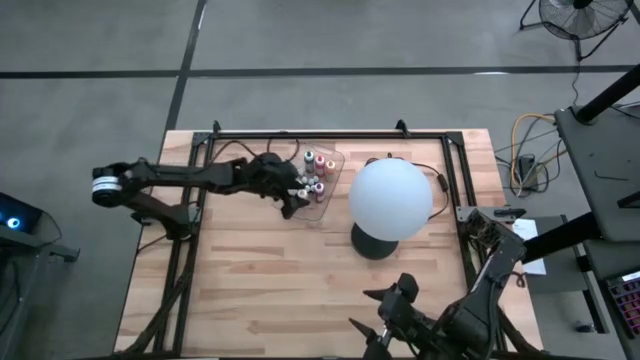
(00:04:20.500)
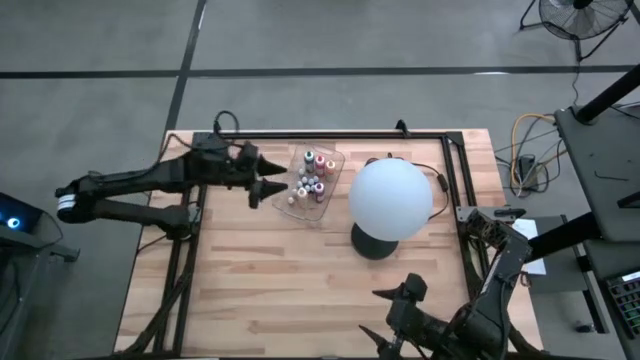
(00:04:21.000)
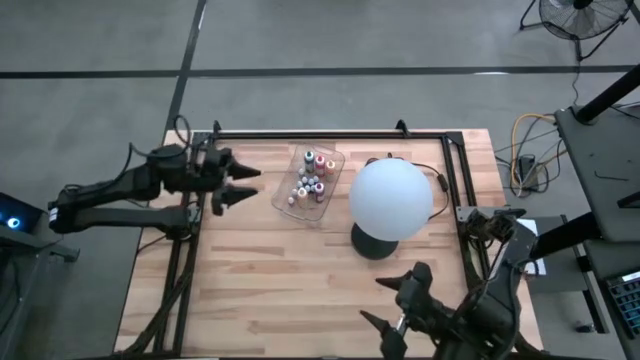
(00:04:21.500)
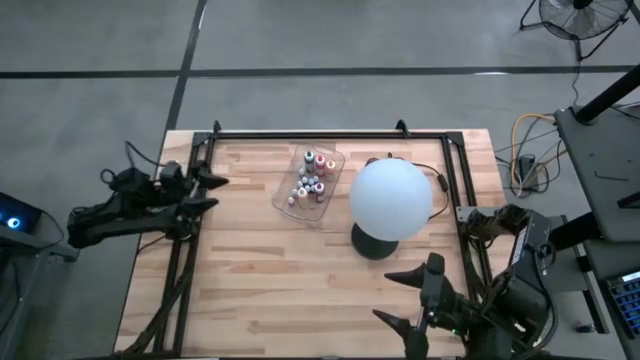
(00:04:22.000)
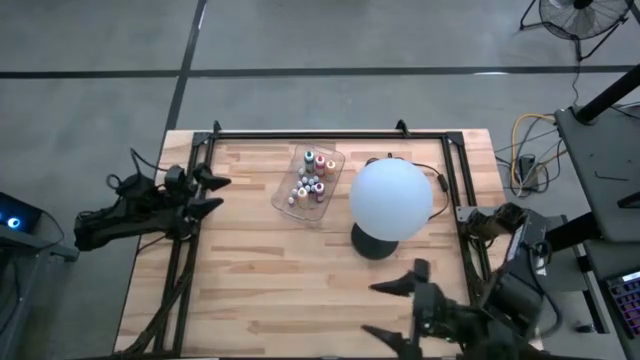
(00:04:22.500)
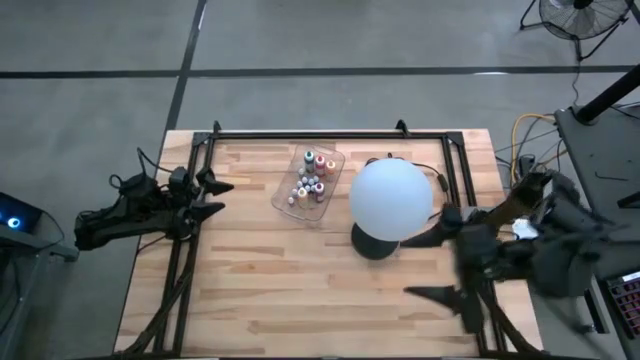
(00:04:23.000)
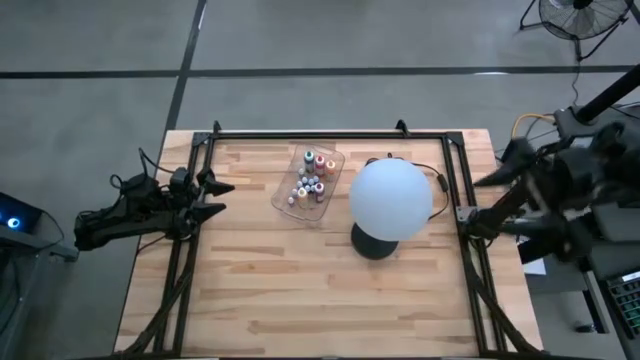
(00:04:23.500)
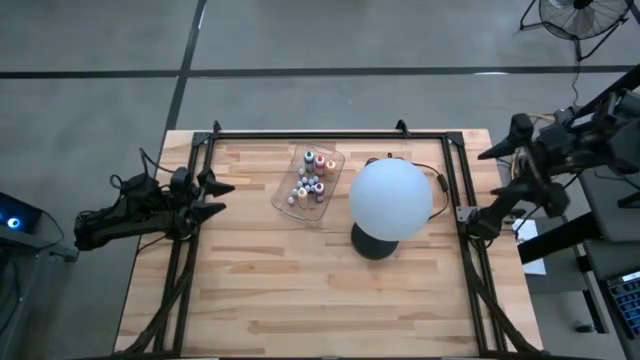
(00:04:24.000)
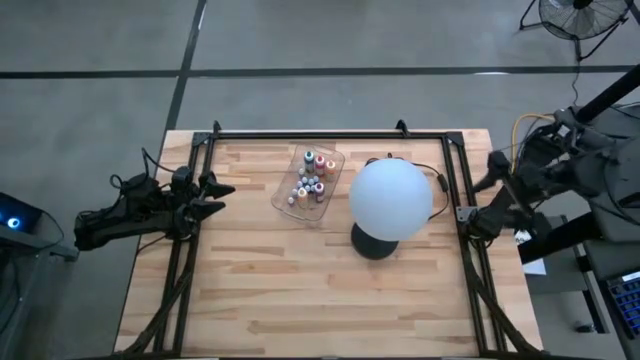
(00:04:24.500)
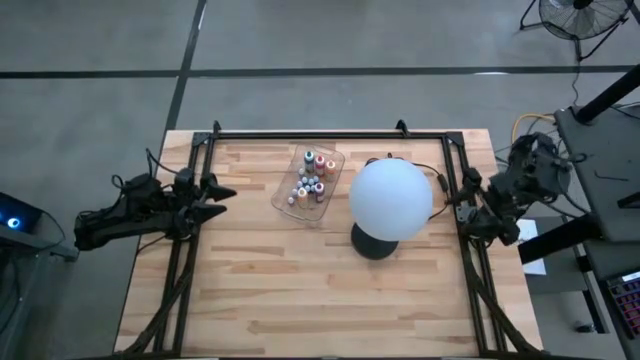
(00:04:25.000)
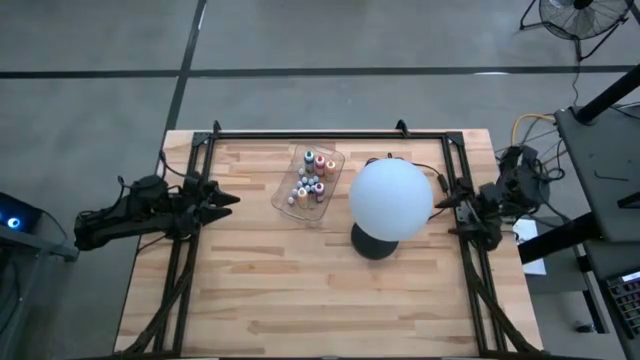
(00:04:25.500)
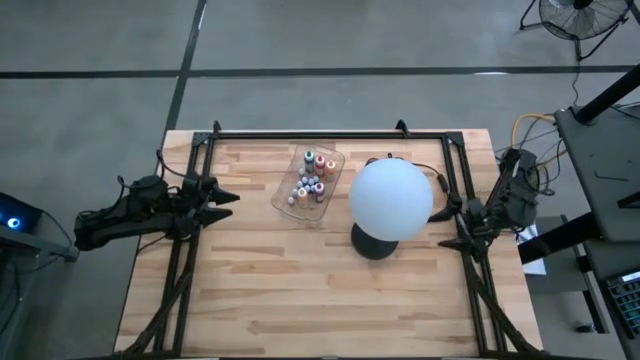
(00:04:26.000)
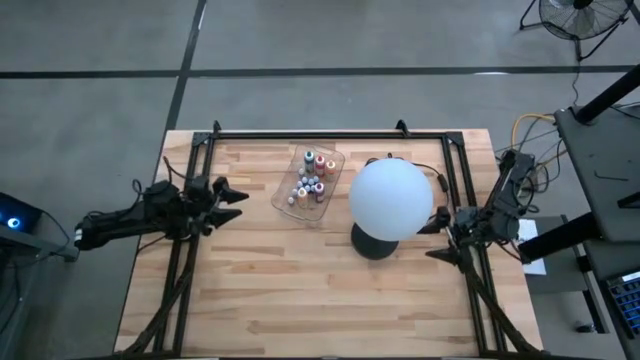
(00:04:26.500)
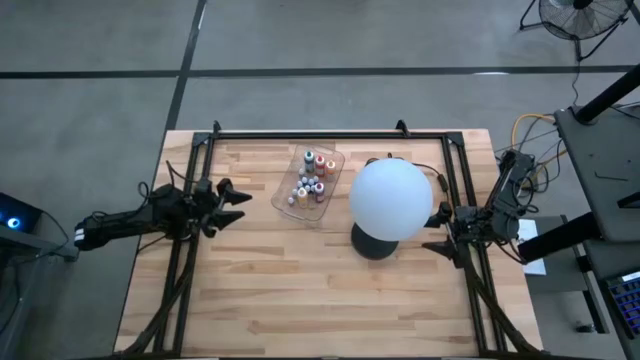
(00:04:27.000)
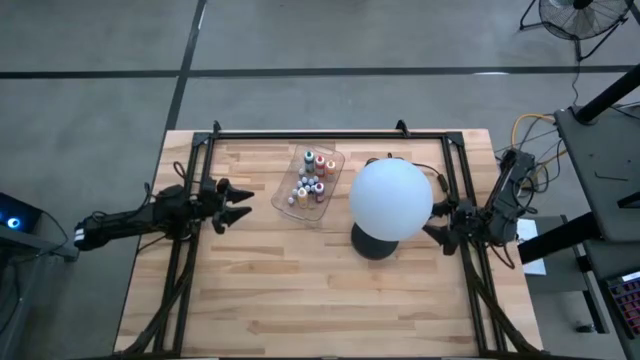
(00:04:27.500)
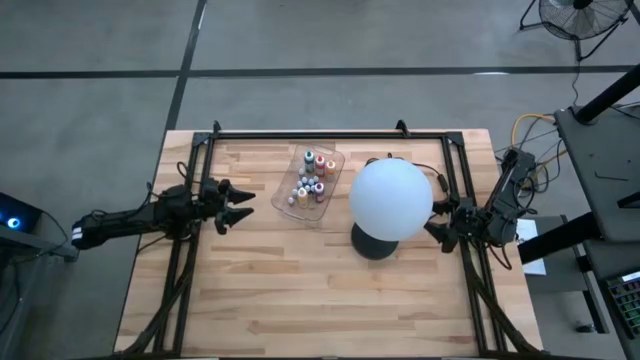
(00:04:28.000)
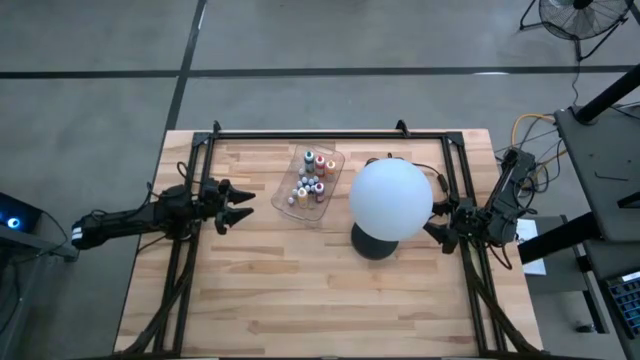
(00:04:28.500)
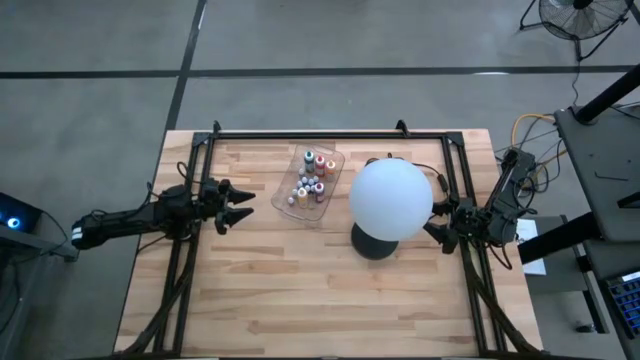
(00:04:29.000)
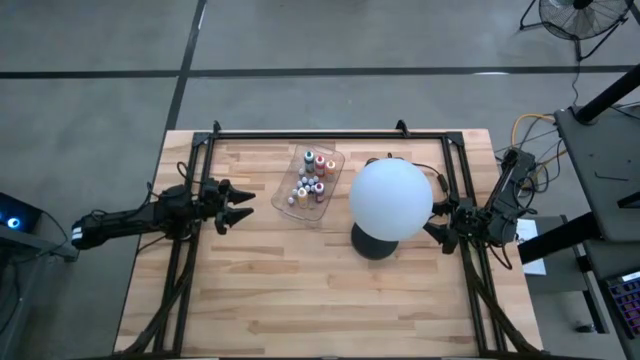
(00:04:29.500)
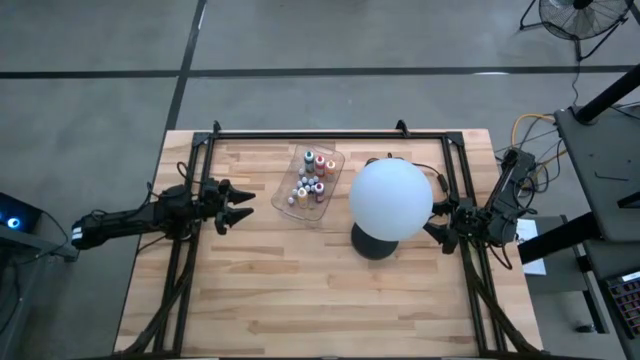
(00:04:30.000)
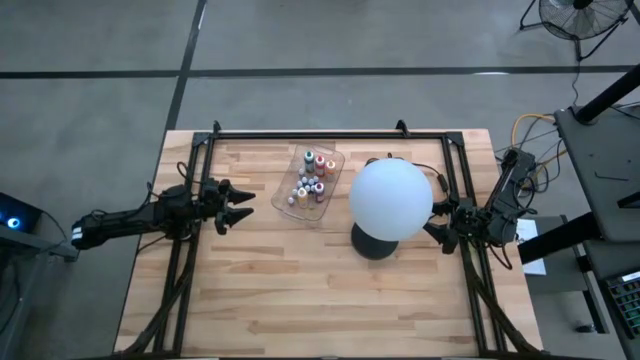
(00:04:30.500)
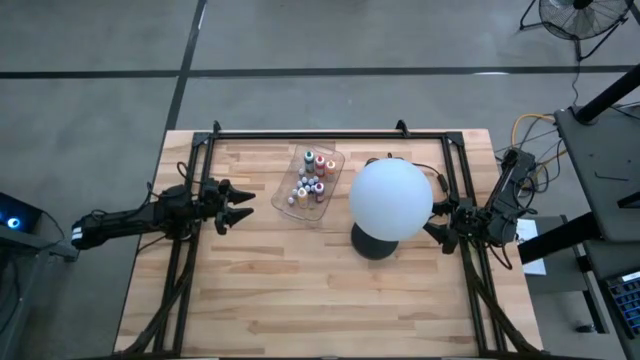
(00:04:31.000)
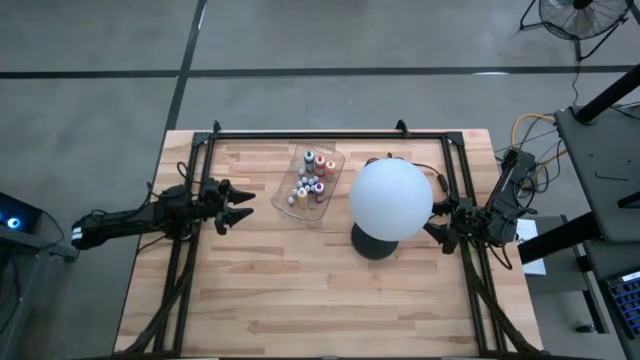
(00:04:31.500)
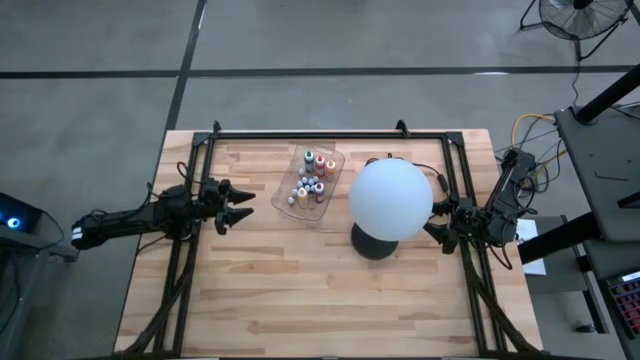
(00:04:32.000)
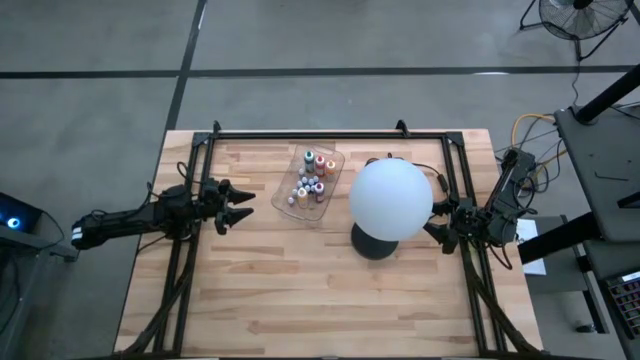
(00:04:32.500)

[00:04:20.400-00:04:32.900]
Task: Pick & Place food coloring
Return to Home Position

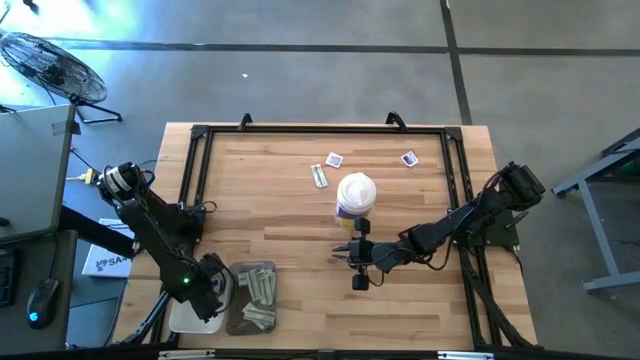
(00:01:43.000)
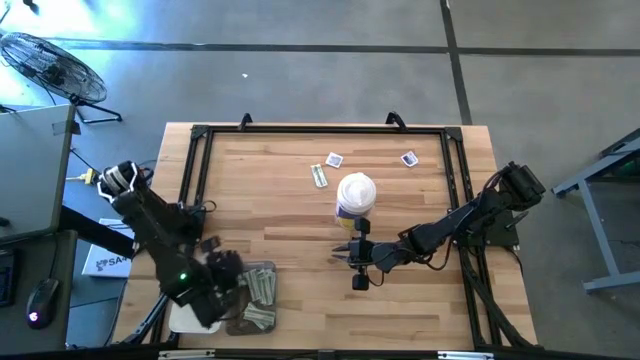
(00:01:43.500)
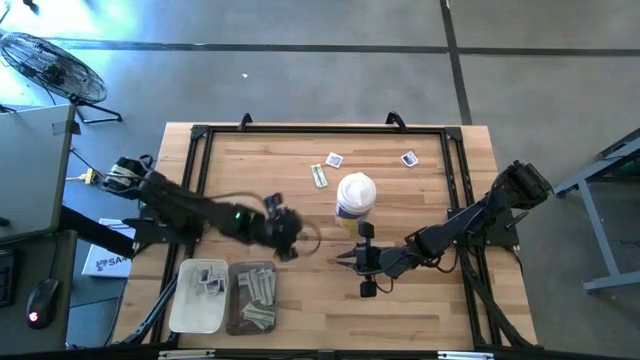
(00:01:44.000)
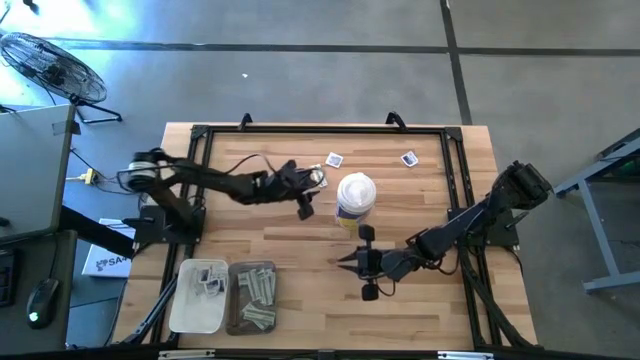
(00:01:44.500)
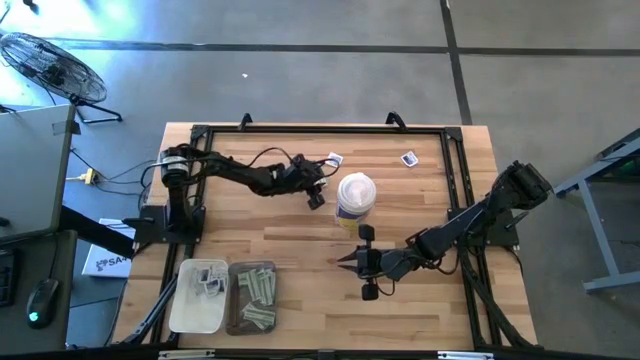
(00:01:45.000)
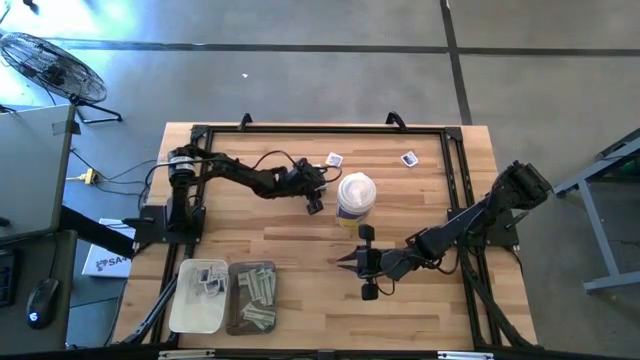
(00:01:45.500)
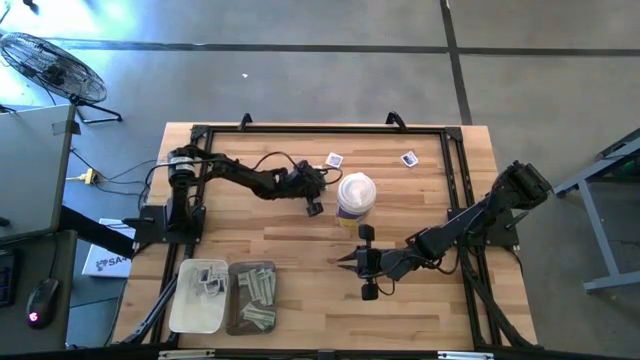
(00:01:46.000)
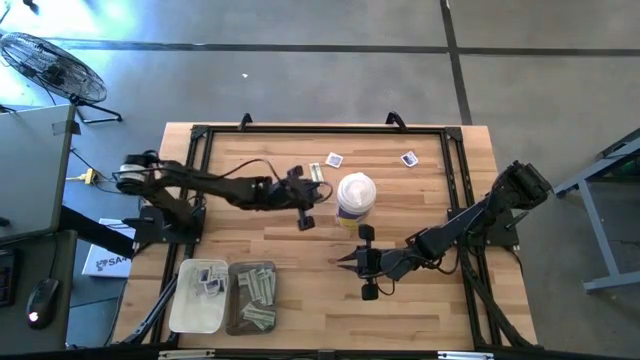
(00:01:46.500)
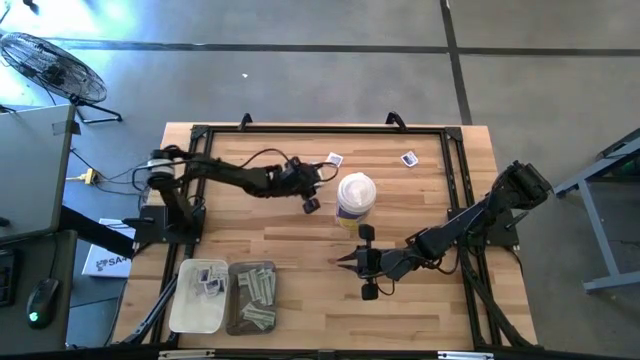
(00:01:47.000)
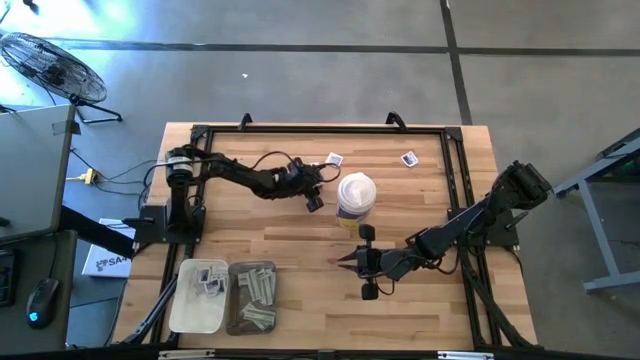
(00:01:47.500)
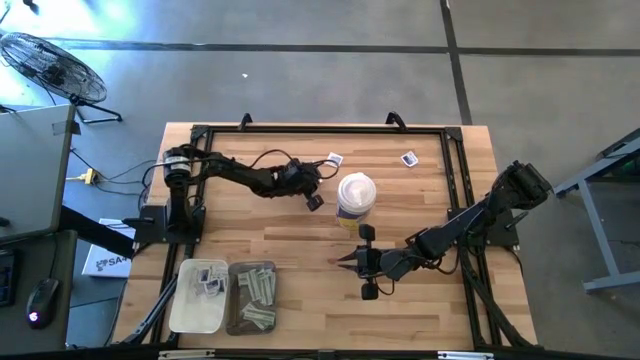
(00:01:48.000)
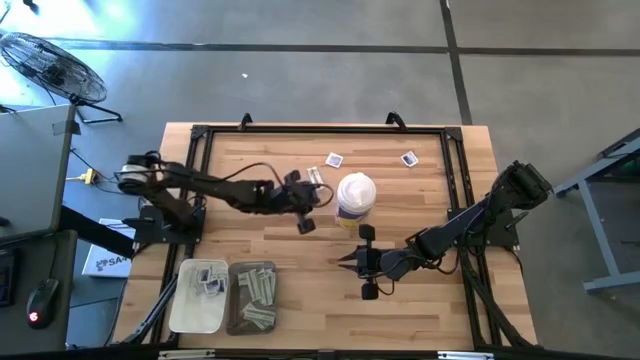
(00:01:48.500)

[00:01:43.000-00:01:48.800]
Task: Pick & Place First Aid Supplies
Put the bandage into the black transparent bin

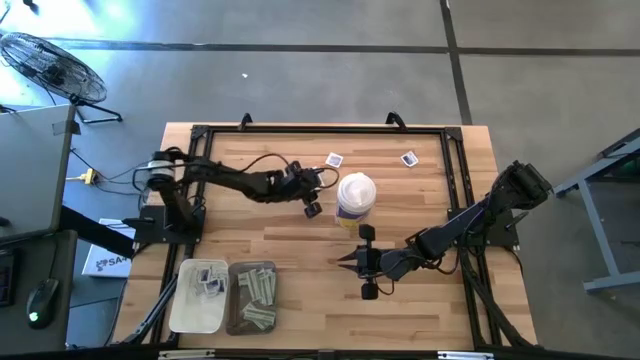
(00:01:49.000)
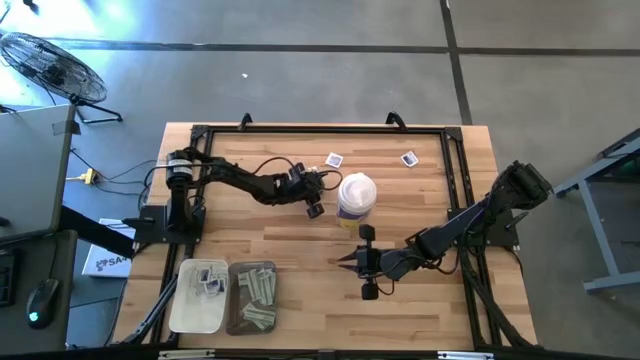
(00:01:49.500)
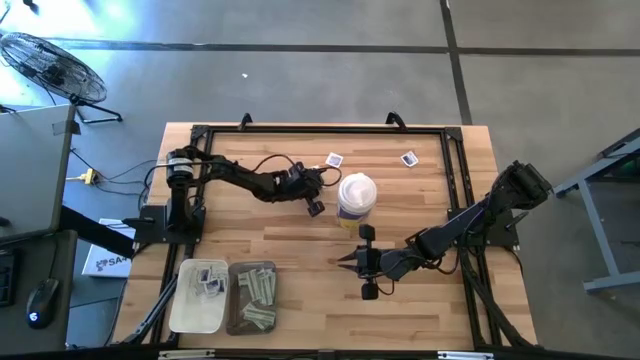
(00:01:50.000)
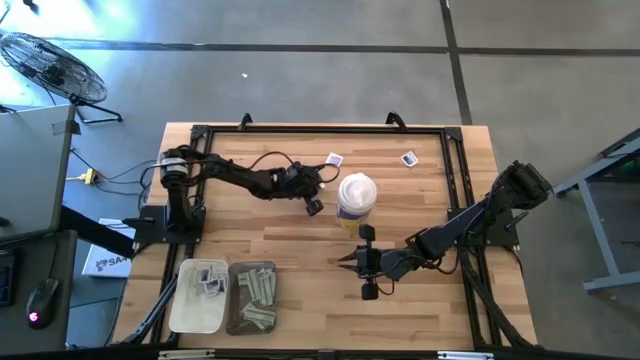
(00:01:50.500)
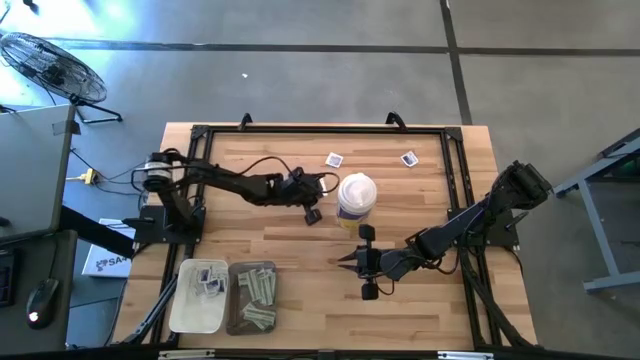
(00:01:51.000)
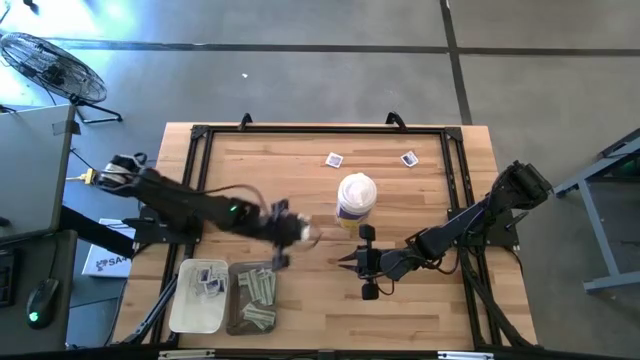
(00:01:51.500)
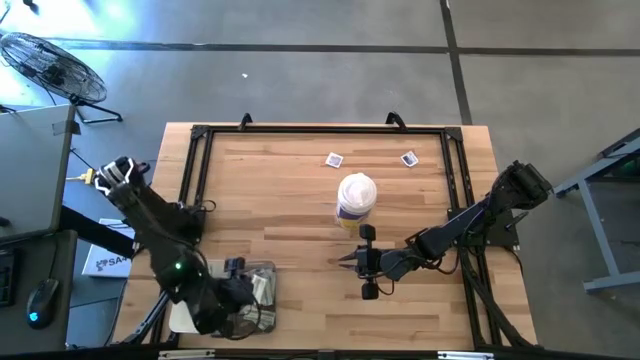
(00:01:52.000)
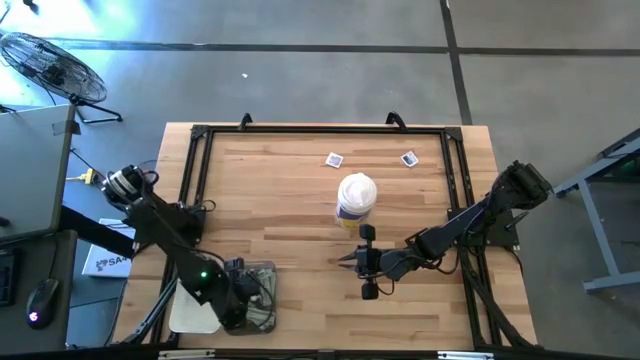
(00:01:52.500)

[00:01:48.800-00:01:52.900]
Put the bandage into the black transparent bin
